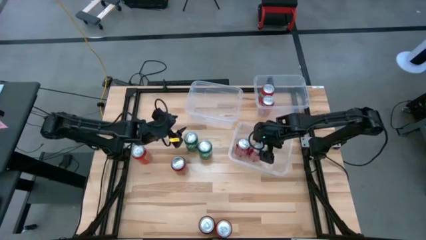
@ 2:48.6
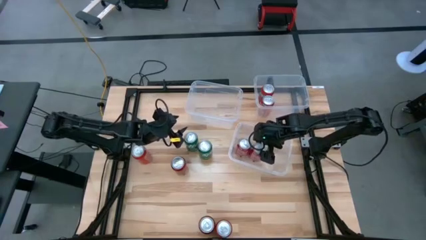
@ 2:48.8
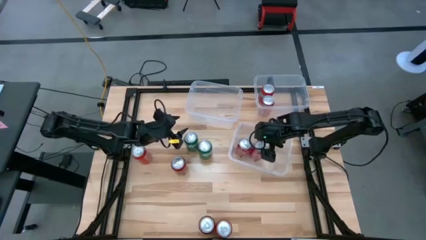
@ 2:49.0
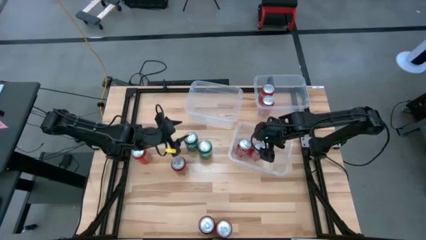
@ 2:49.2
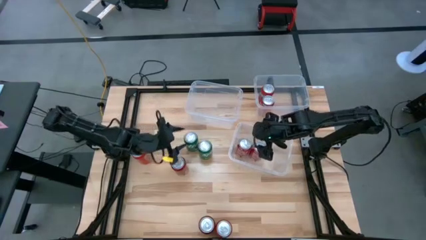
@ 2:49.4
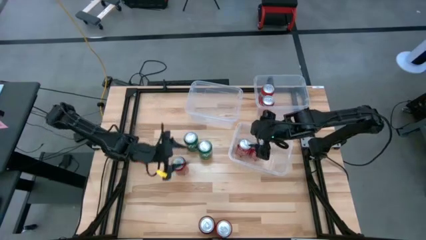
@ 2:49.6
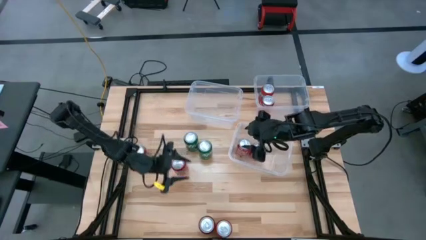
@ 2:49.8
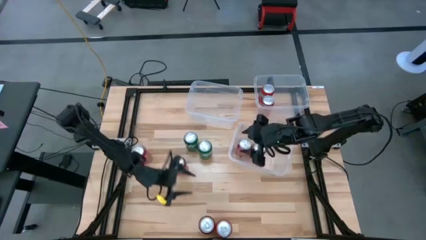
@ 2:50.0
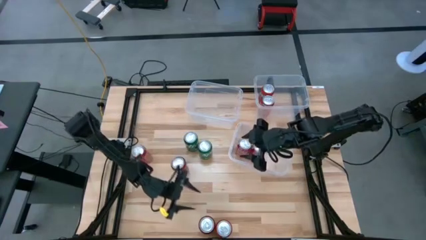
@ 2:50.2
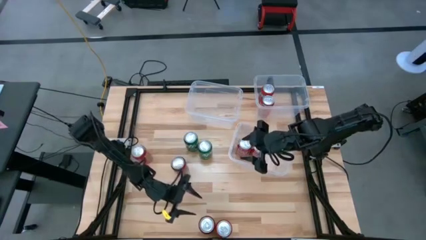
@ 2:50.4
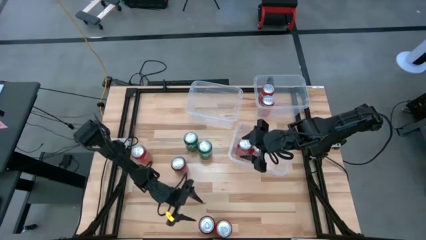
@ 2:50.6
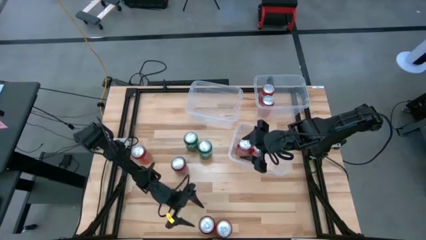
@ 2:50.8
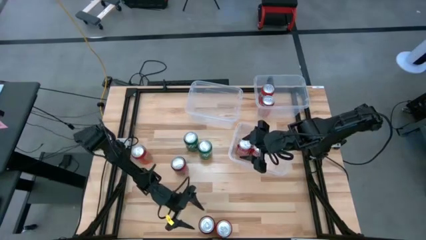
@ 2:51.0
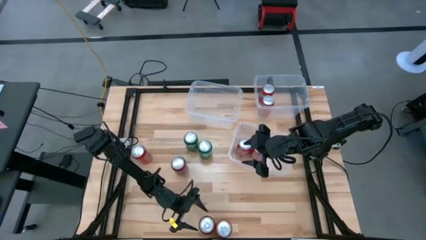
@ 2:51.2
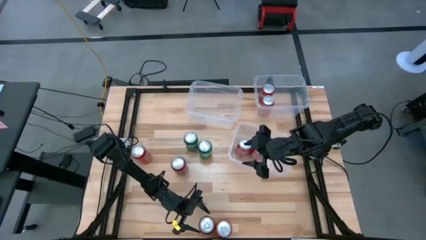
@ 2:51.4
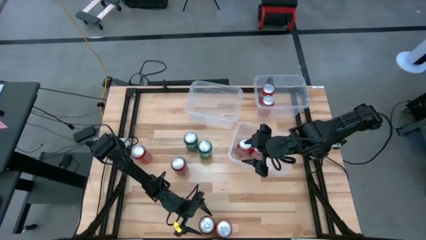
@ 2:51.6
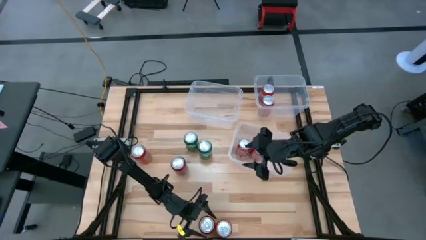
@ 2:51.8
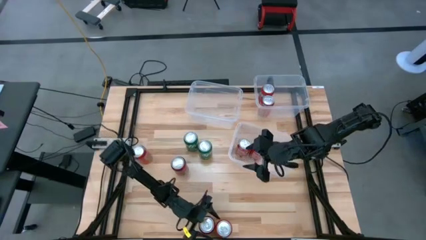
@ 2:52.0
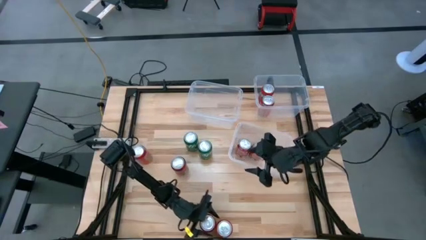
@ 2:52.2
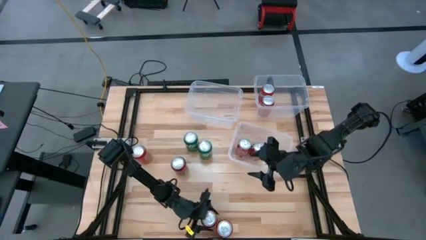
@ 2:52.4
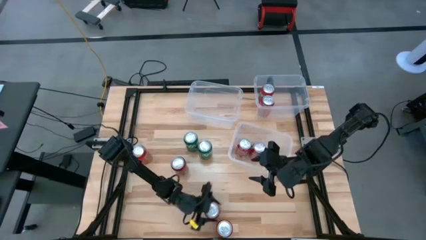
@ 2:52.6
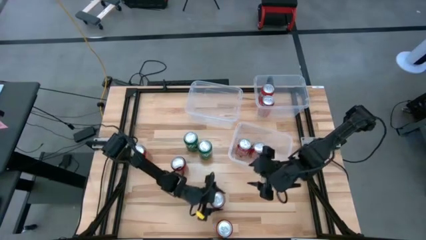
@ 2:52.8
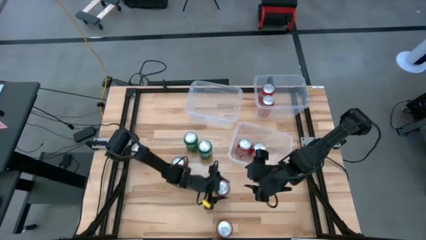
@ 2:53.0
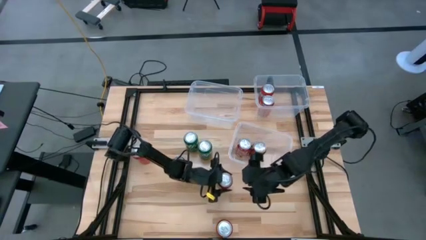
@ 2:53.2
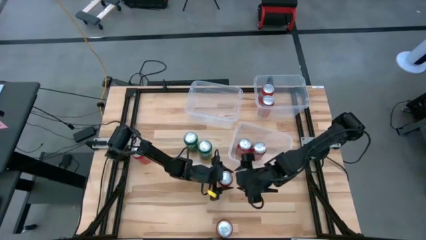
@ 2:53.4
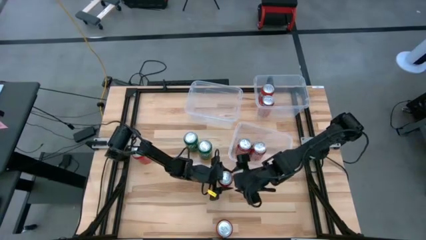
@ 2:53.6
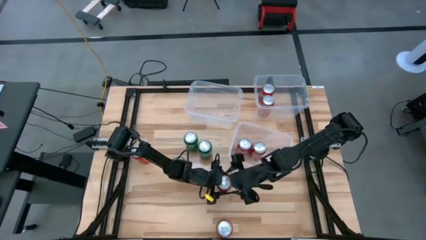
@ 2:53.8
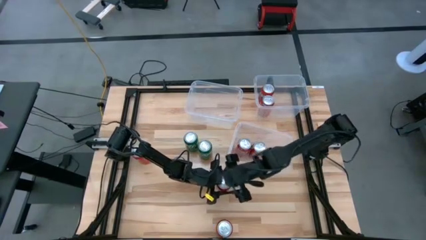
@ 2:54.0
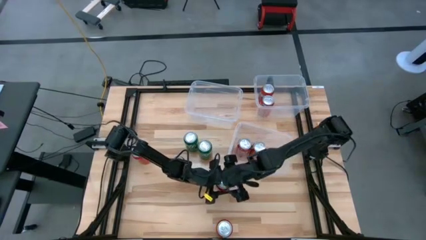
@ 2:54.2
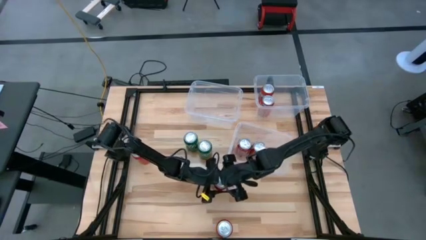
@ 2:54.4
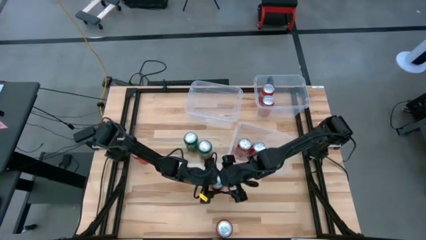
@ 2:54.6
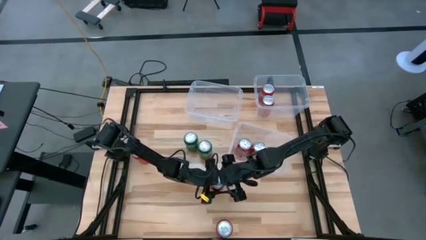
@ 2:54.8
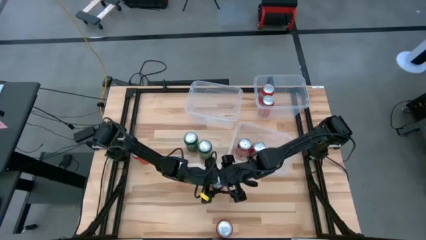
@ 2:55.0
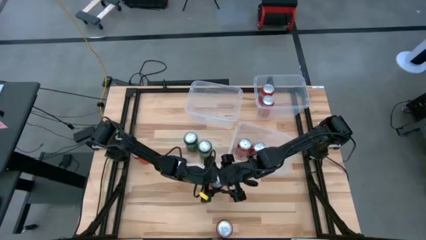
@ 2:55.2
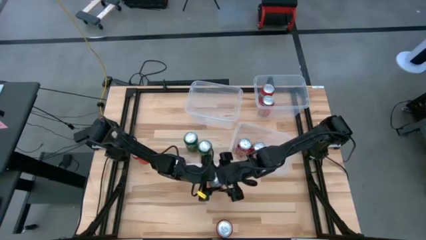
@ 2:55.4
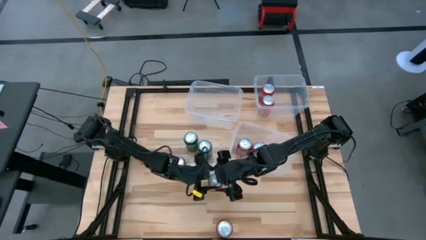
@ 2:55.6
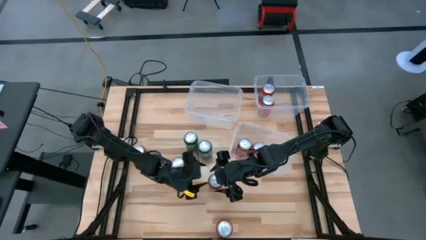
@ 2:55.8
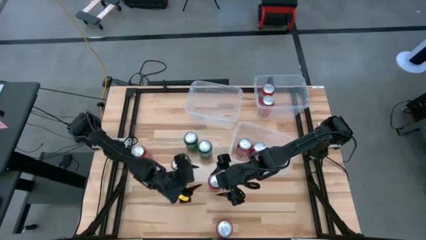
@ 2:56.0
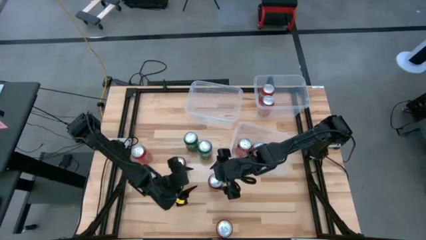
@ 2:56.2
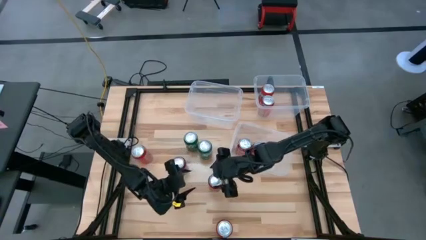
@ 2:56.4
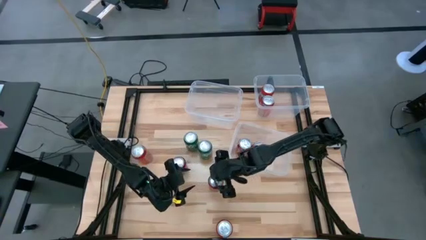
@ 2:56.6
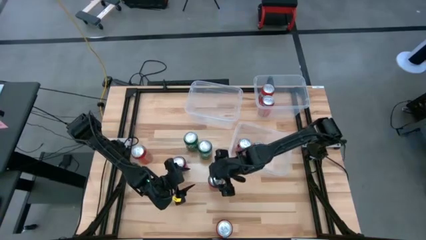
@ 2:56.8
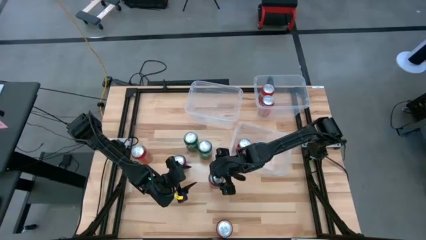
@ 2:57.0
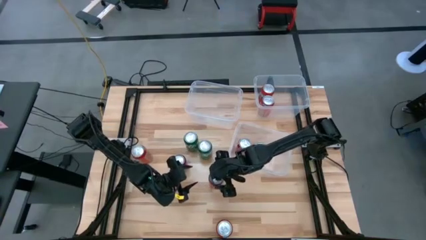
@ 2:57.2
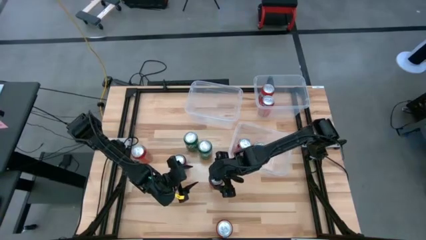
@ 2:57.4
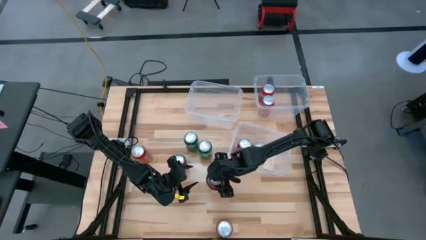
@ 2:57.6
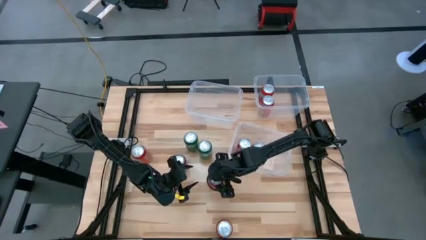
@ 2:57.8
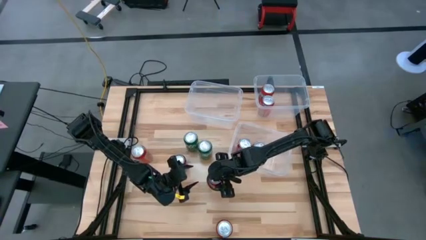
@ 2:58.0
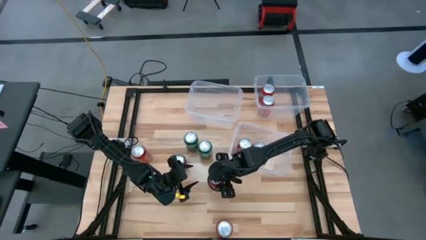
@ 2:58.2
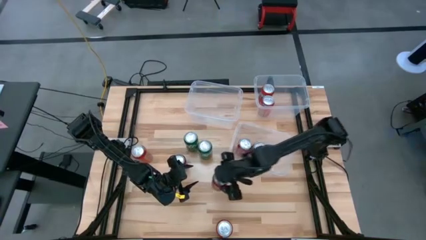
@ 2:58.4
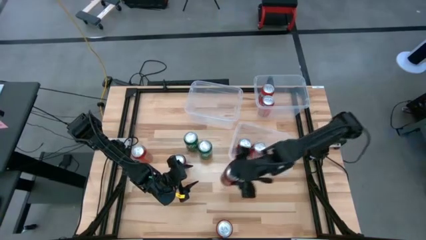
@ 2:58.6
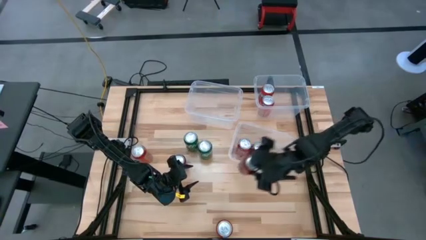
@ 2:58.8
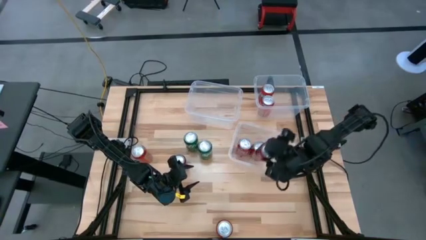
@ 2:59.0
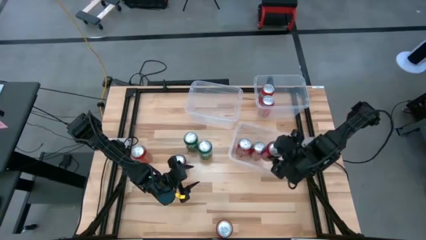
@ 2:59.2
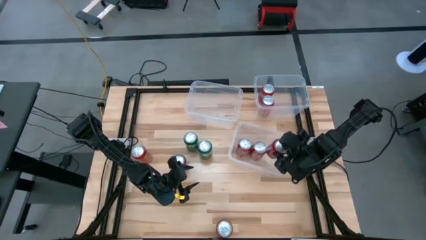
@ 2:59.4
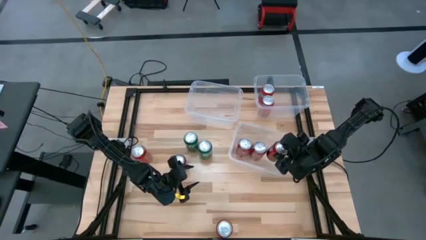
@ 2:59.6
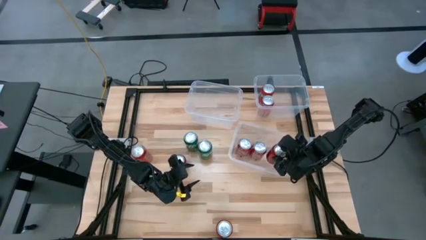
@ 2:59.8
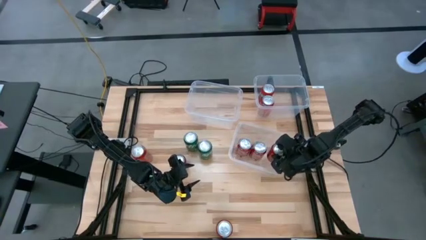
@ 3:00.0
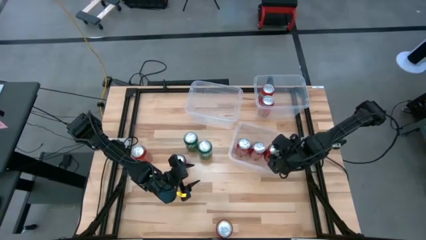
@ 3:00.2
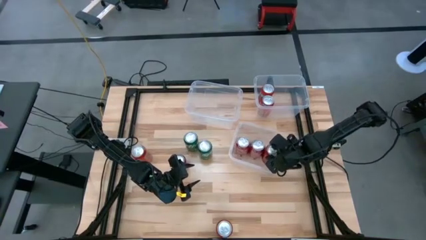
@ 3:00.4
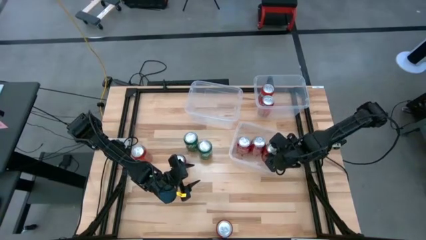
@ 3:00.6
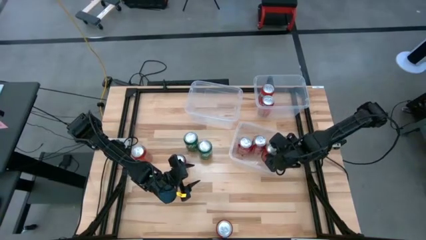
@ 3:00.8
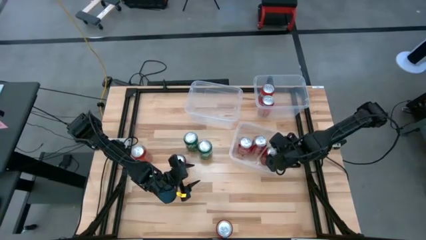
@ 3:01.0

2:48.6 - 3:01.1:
Task: Sort soda cans
Put the bottom red-black soda can into the bottom transparent bin

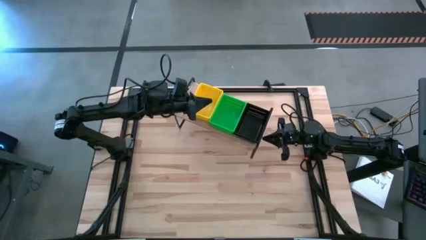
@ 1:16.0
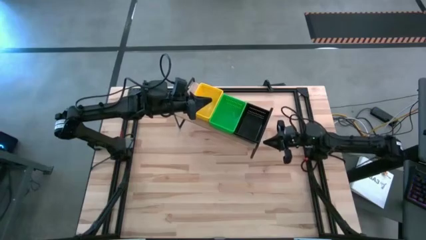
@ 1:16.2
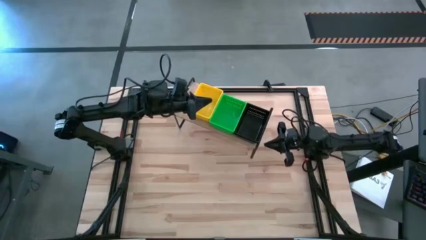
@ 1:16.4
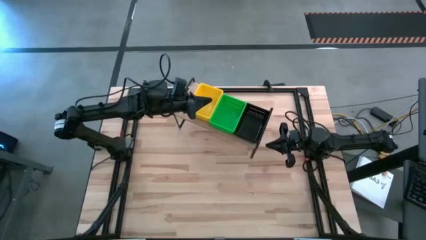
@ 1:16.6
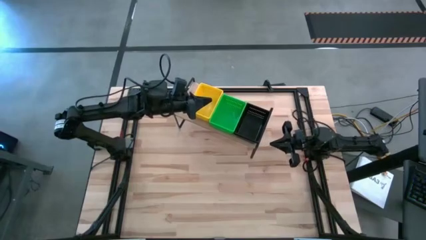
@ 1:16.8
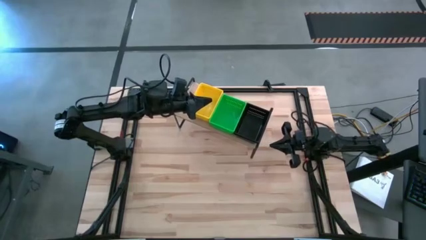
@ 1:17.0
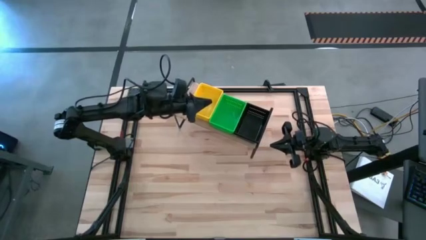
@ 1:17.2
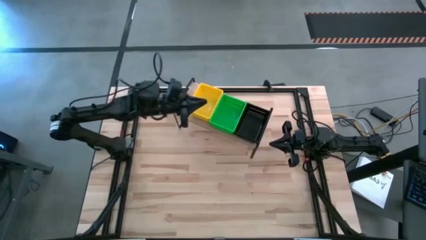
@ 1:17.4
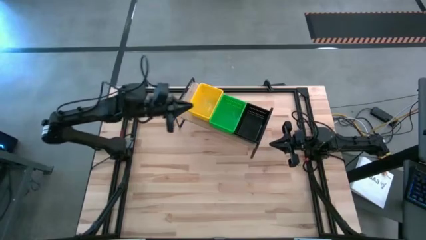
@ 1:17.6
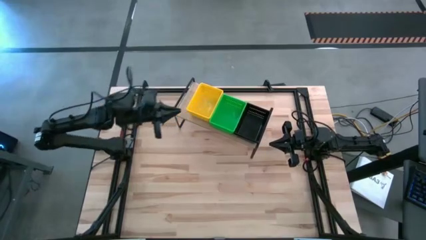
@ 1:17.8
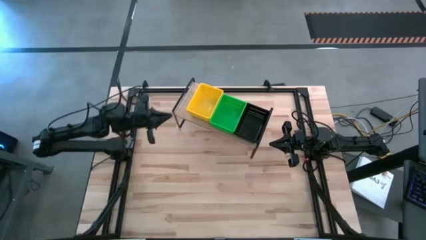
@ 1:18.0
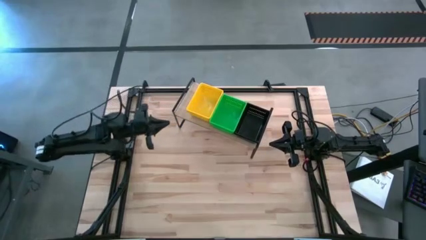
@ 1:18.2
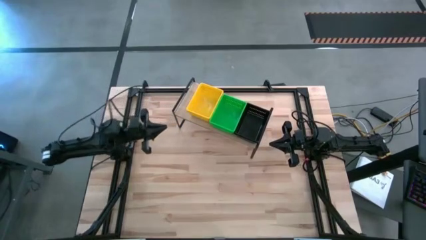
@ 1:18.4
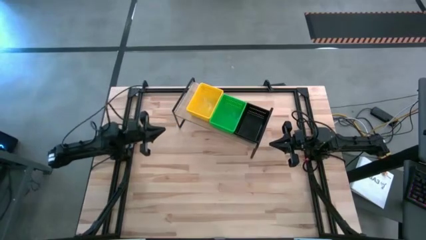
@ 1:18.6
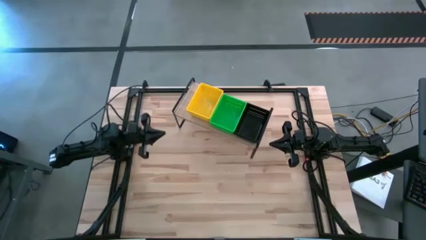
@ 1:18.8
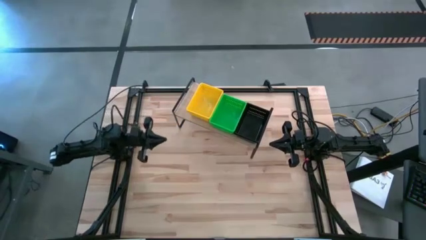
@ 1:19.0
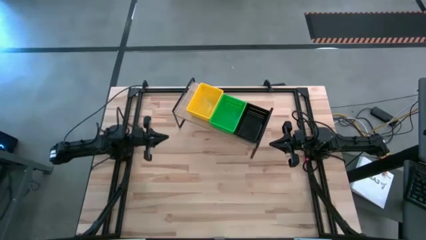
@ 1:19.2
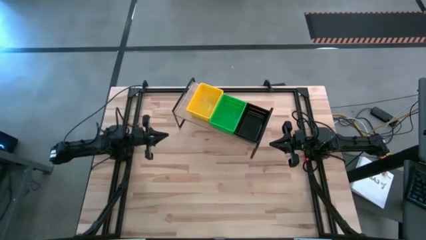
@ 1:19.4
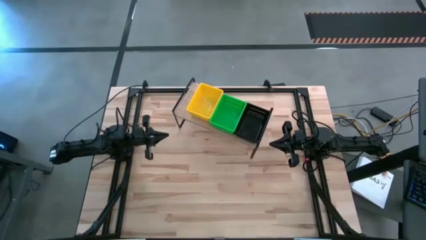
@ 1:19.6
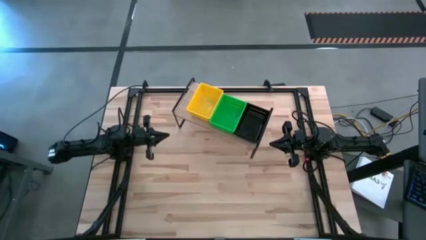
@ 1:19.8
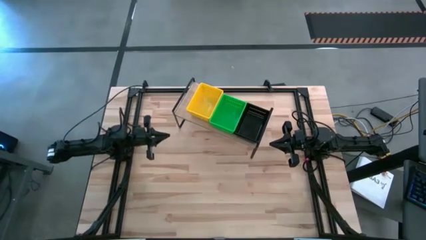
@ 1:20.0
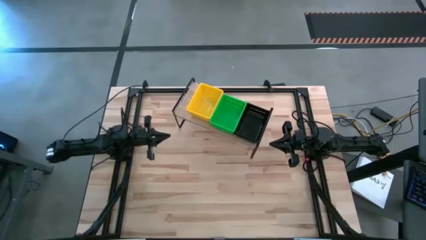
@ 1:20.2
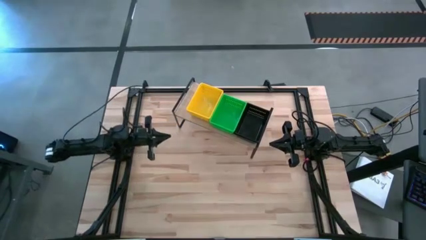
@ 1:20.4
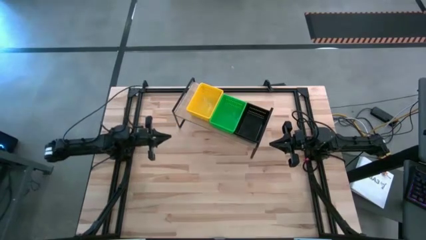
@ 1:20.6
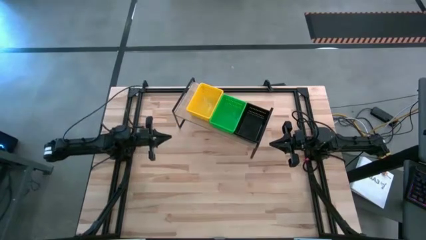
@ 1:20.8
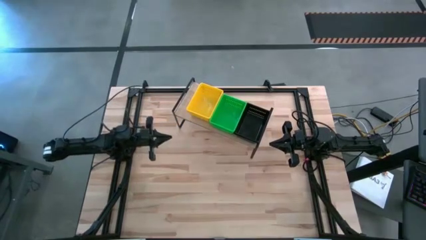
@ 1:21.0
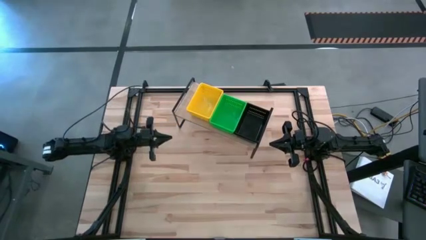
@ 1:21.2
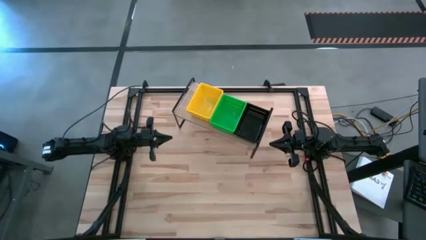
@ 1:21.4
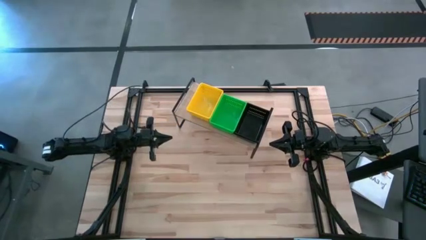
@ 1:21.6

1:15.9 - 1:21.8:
Task: Stack baskets on shelf by color
Return to Home Position
